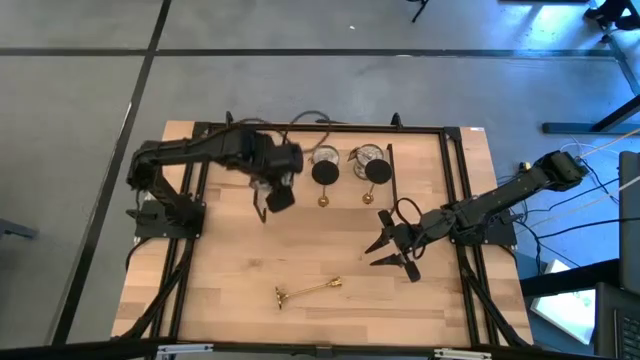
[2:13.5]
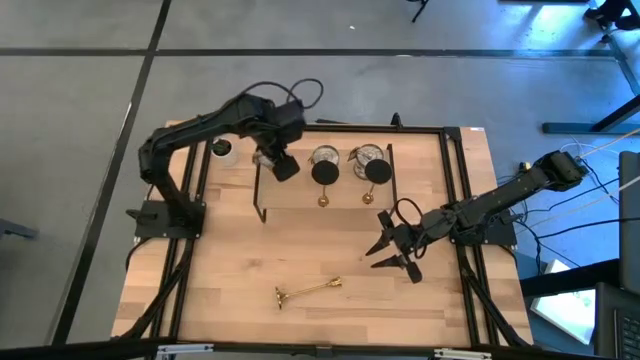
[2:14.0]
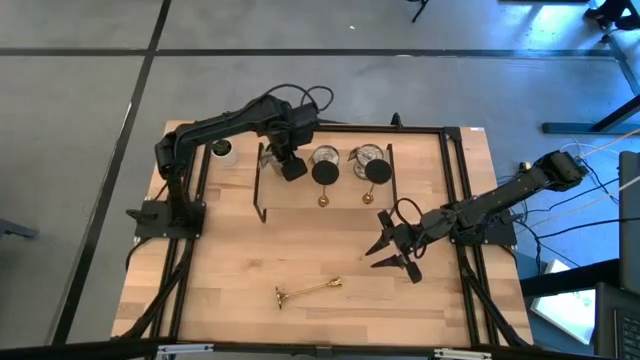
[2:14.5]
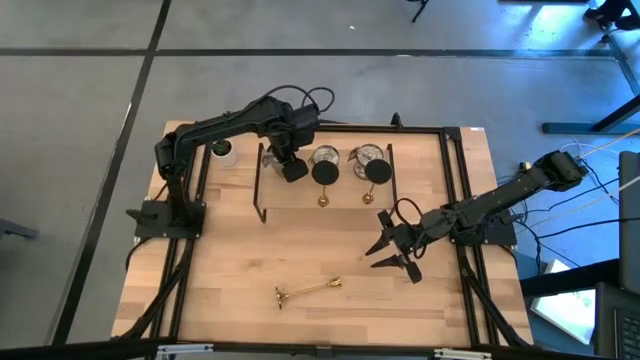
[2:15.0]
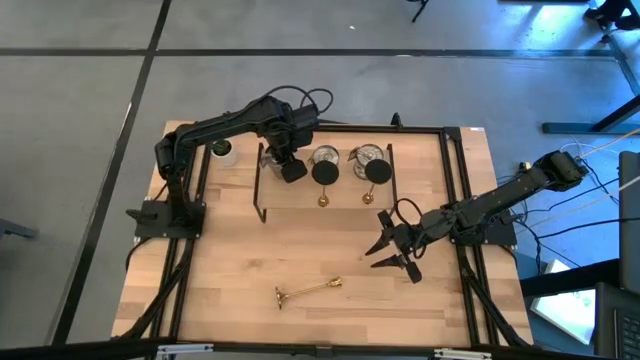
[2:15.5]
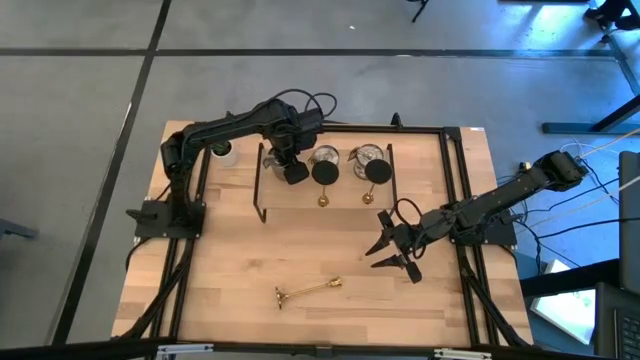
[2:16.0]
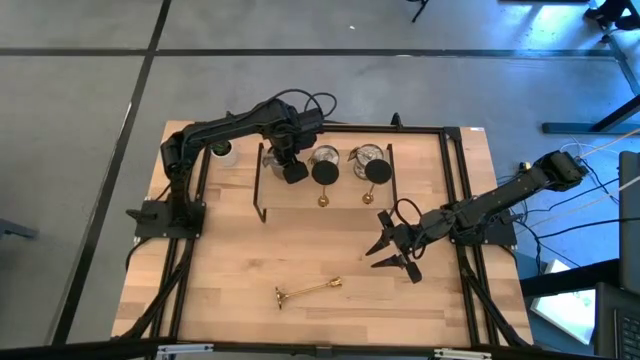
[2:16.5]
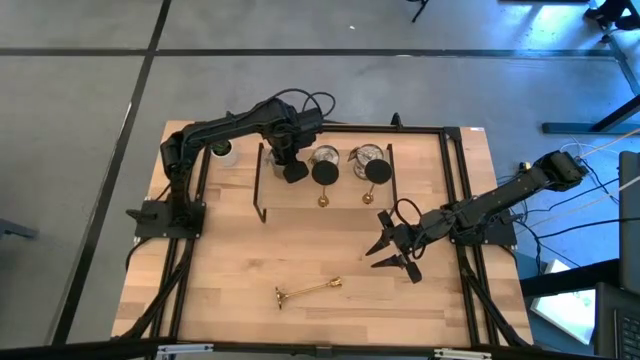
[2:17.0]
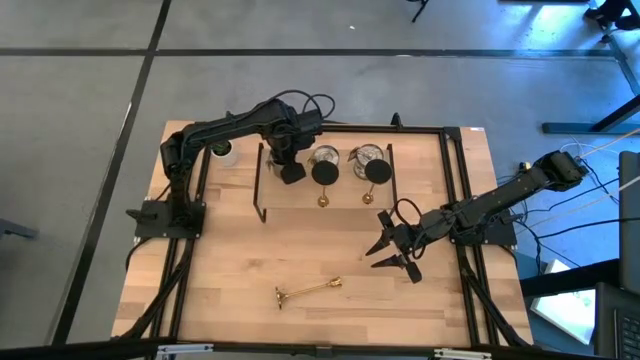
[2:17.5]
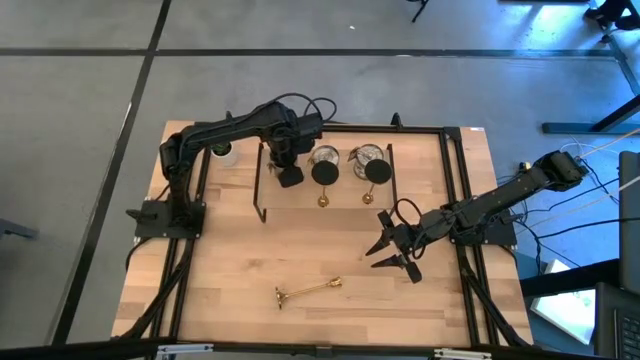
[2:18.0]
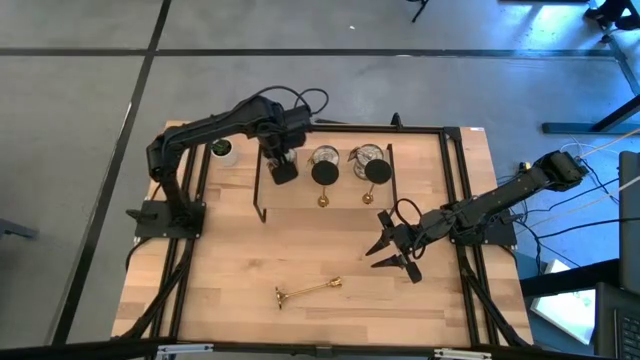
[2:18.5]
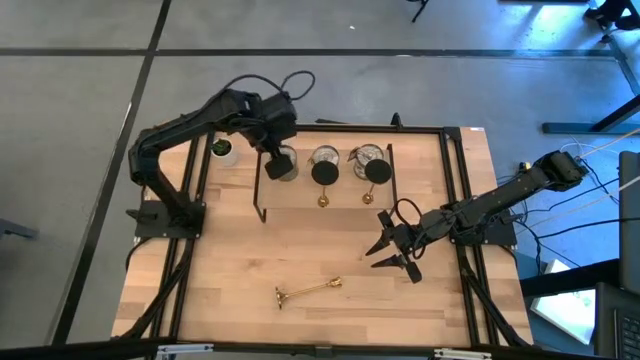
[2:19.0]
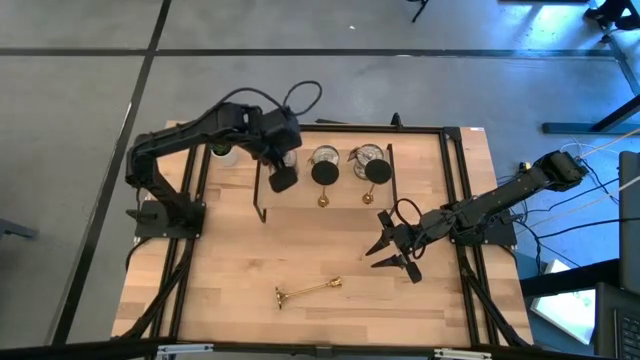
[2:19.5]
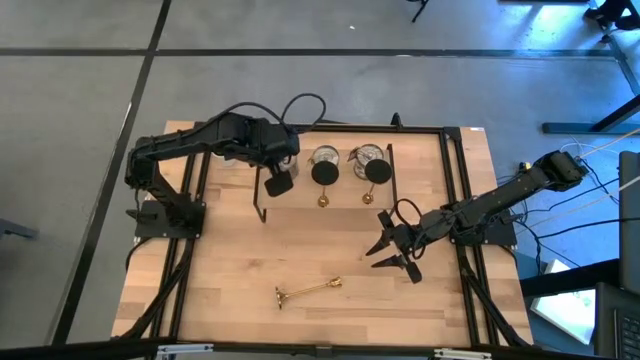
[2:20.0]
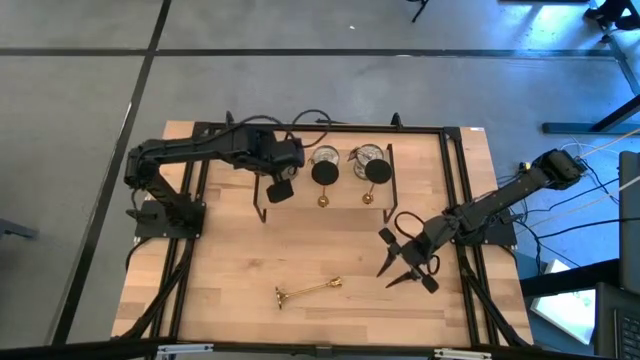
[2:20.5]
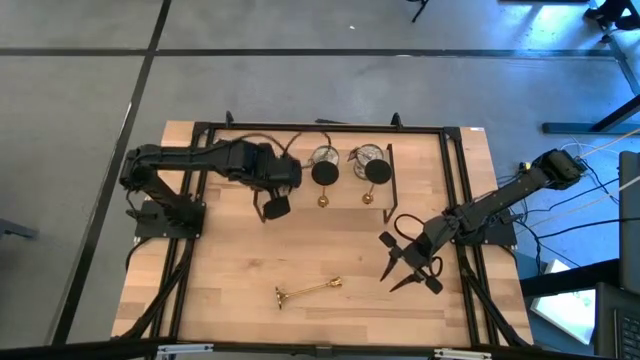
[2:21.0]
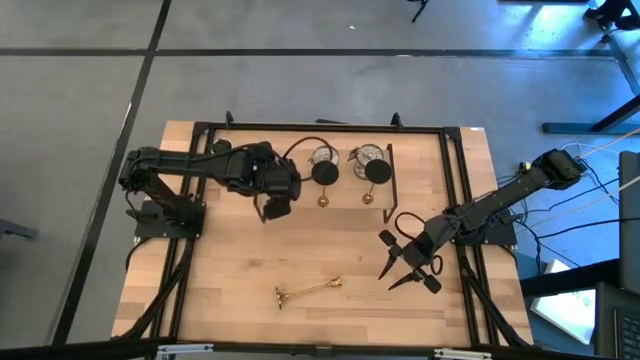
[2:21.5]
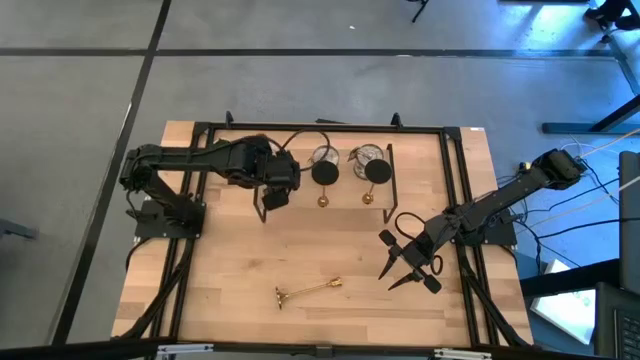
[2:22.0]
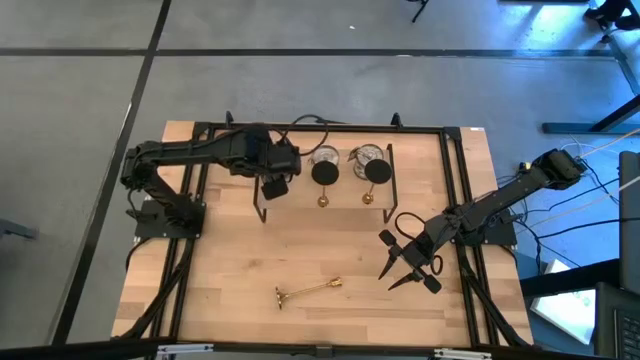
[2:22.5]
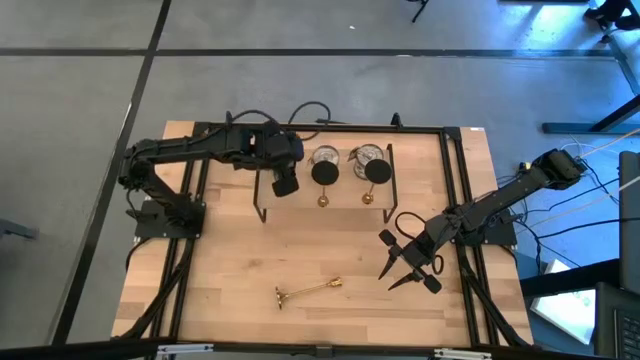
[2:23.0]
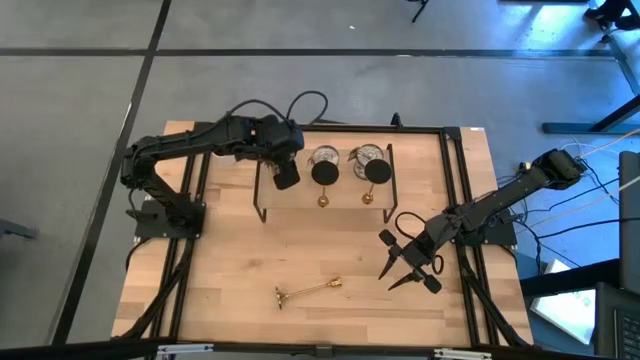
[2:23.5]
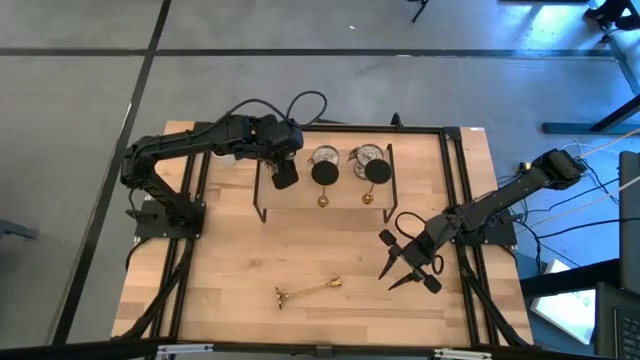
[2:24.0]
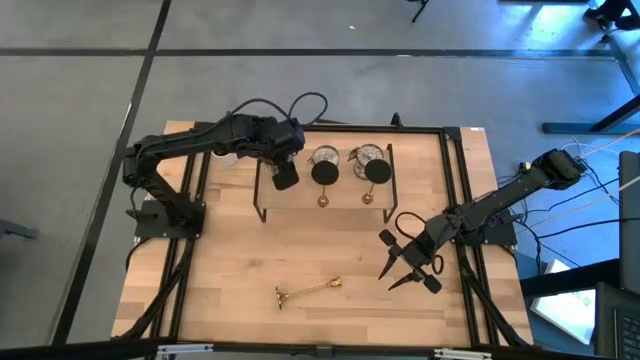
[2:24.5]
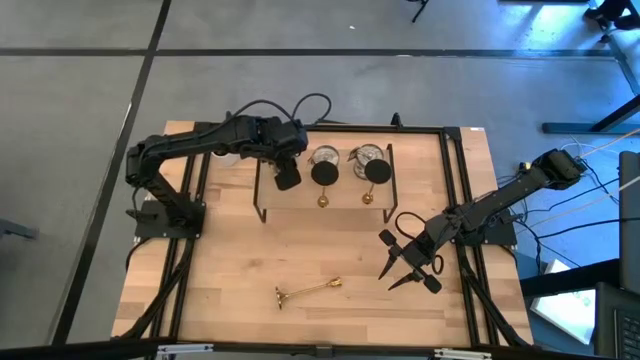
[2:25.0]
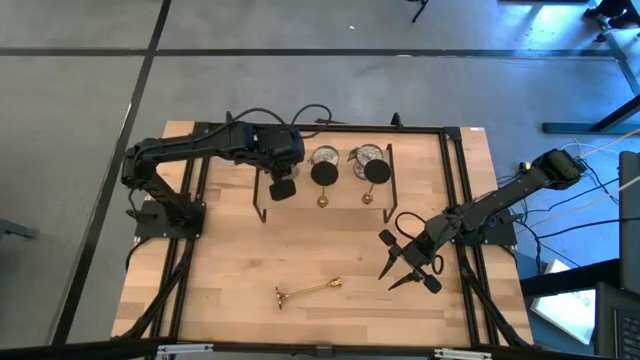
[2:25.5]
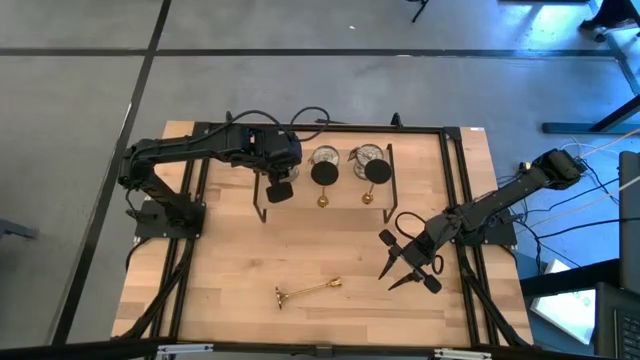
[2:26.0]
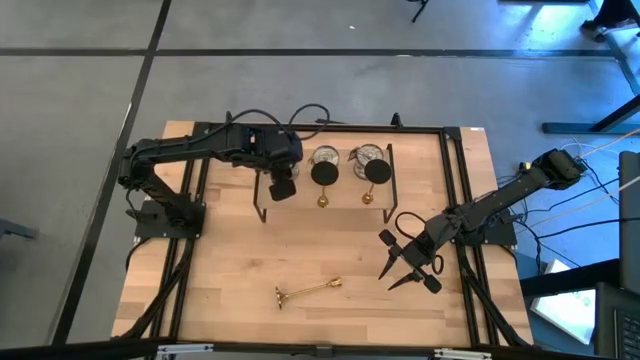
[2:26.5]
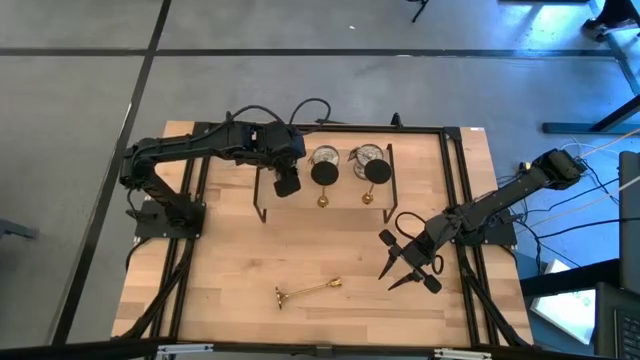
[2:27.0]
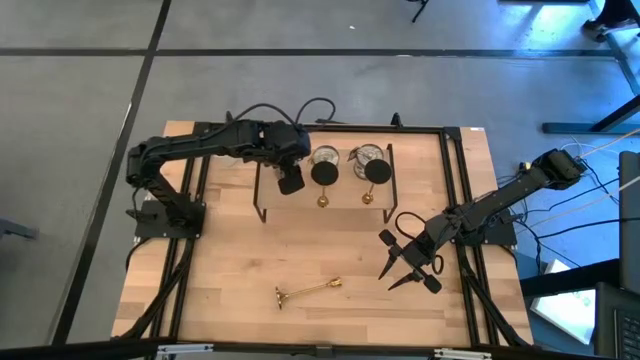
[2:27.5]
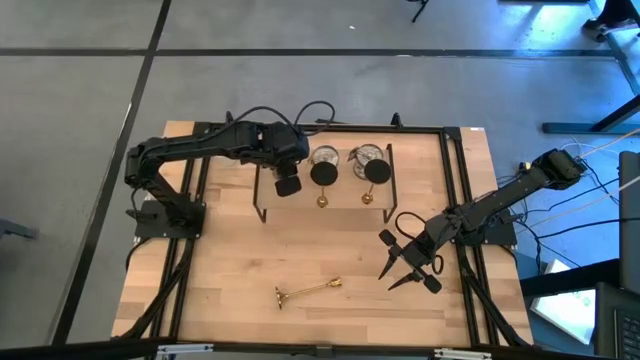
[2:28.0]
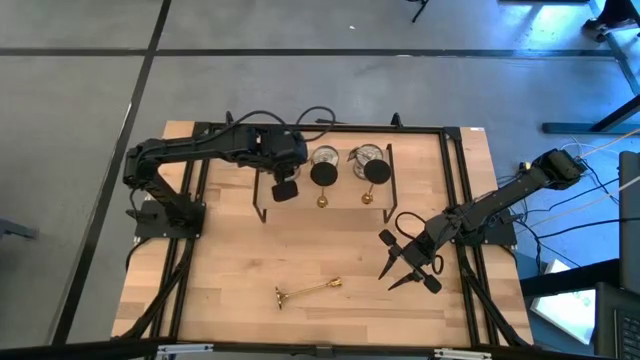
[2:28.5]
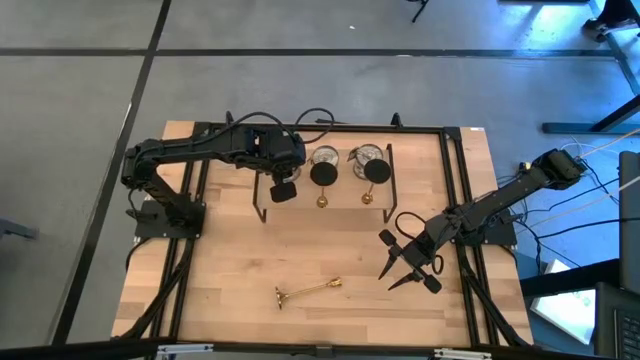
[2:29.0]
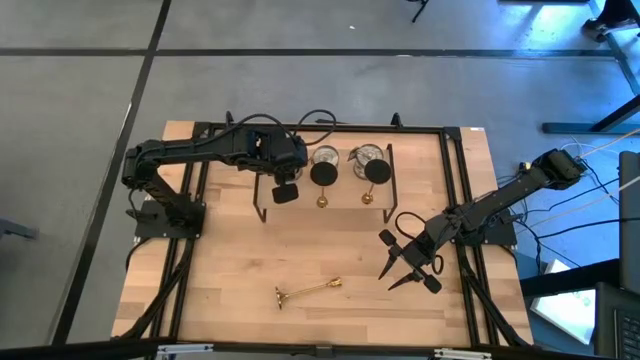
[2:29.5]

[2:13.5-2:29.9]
Task: Pick & Place candle stick holders
Put the silver scented candle on the shelf

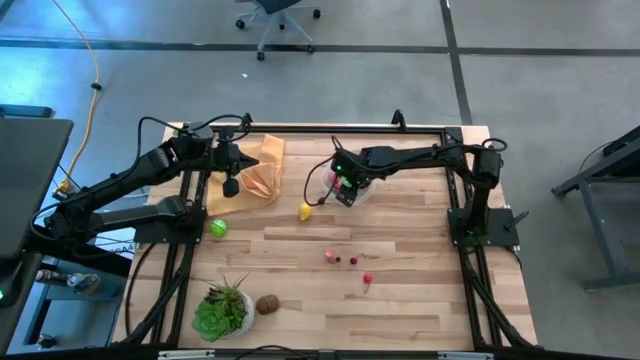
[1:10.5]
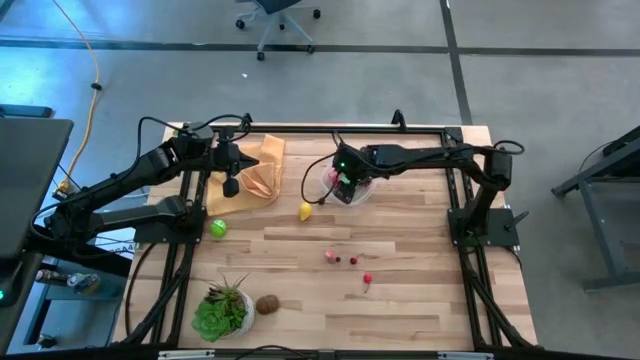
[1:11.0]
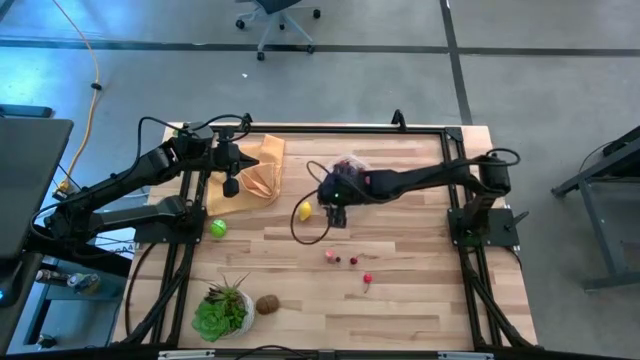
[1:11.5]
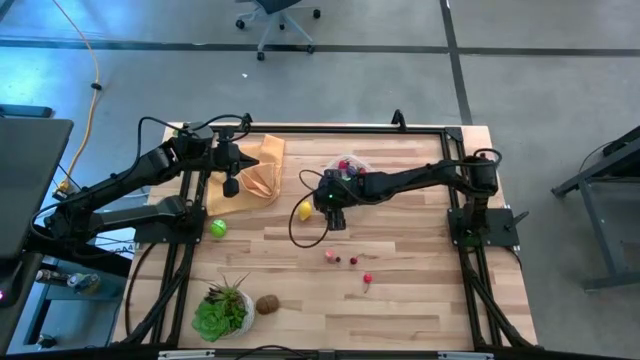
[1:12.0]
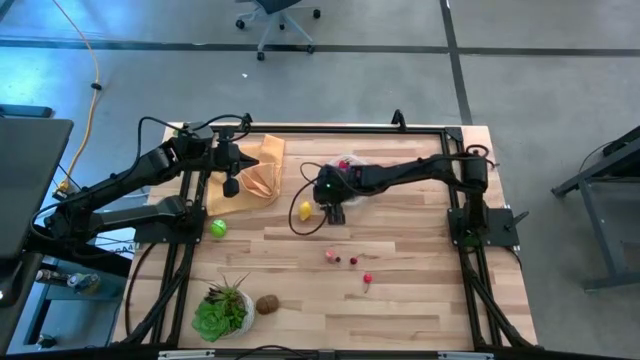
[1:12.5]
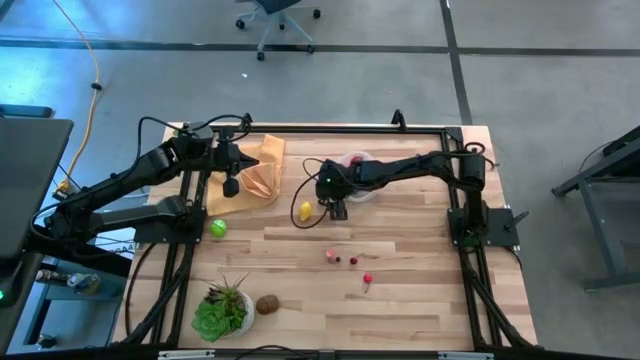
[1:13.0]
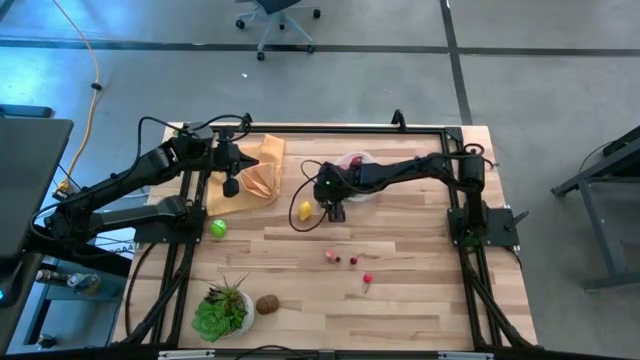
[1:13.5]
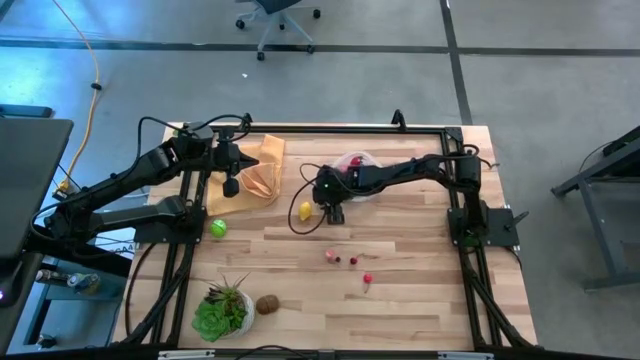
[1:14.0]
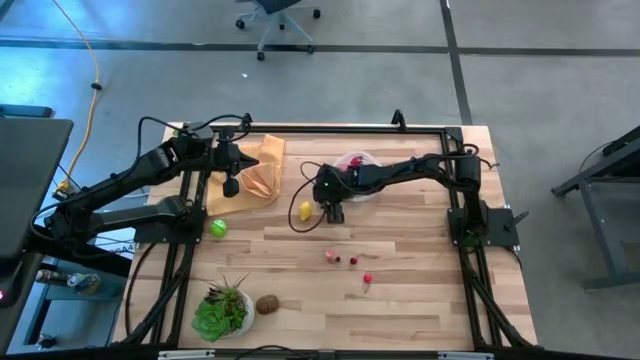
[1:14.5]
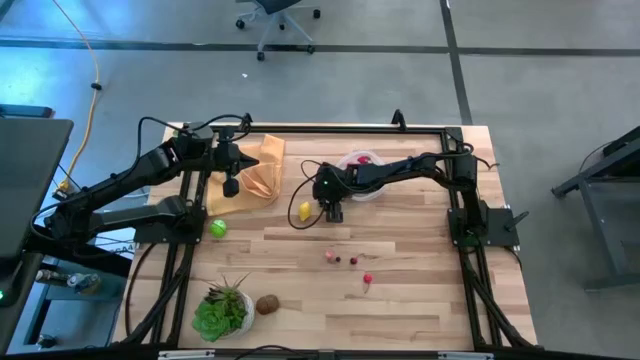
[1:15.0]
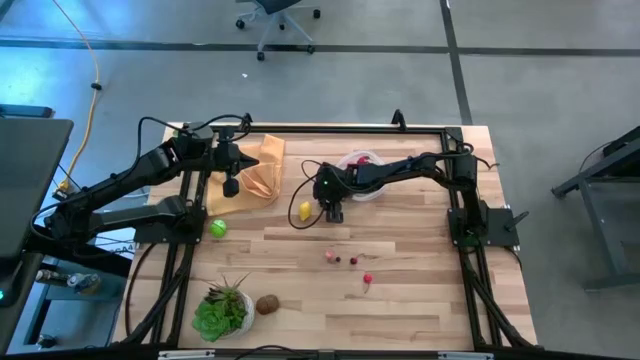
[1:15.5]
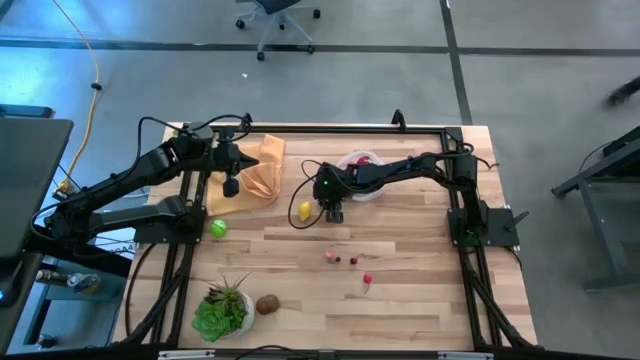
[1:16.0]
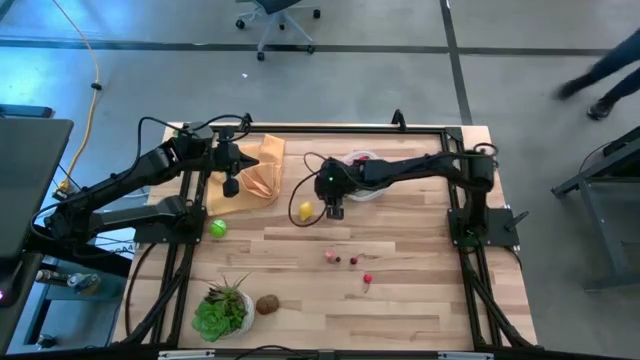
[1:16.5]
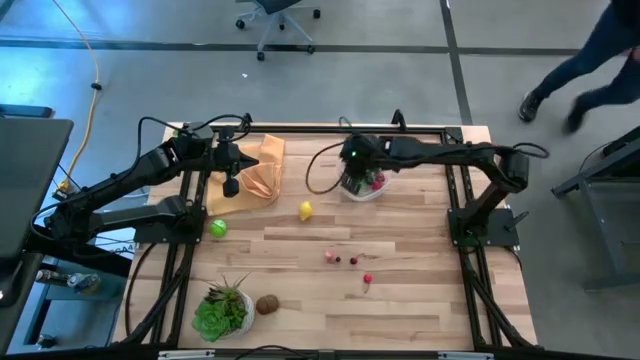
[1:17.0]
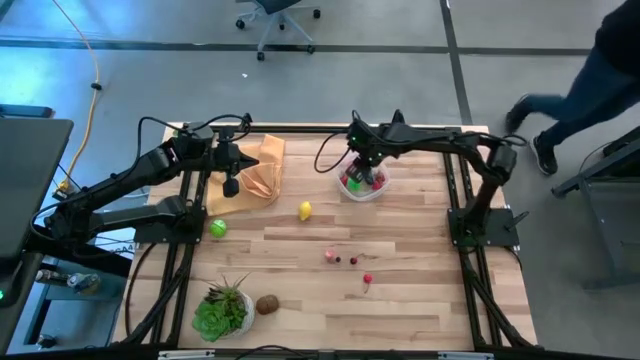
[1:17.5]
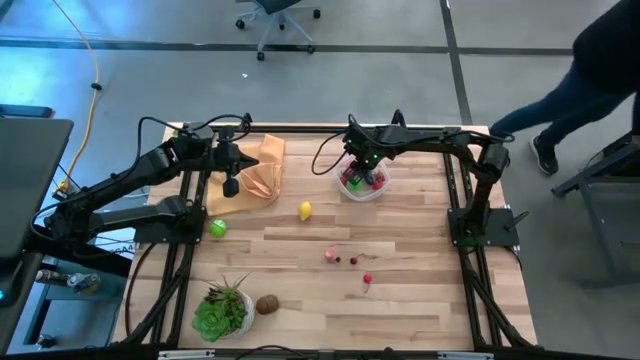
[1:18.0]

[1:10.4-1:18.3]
Task: Pick and placing Produce into tupperware
Put the blackberry into the transparent container
